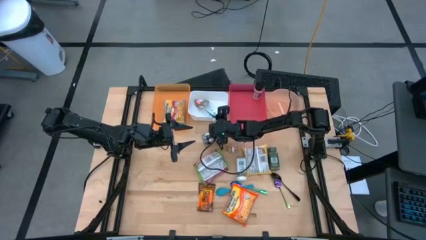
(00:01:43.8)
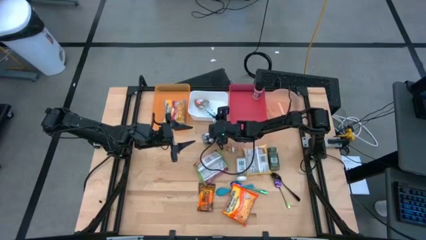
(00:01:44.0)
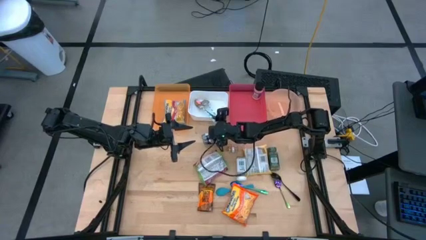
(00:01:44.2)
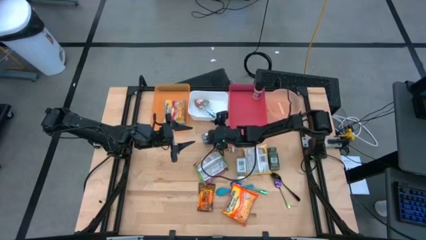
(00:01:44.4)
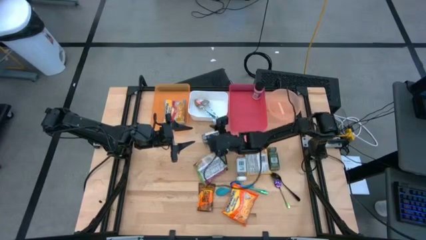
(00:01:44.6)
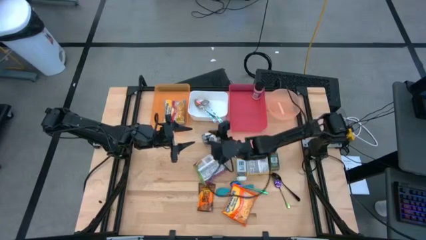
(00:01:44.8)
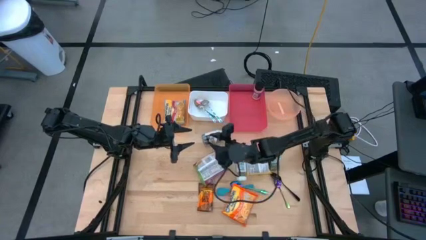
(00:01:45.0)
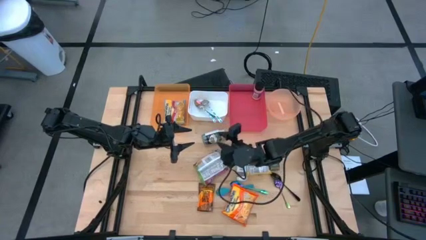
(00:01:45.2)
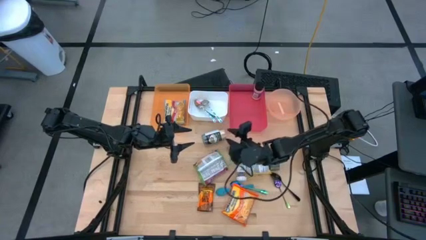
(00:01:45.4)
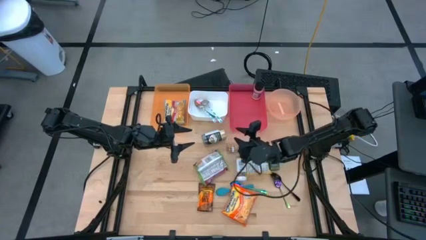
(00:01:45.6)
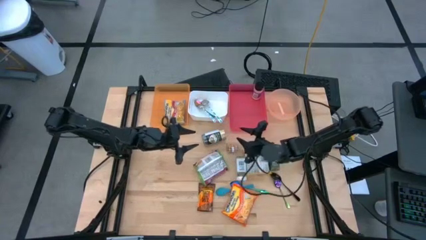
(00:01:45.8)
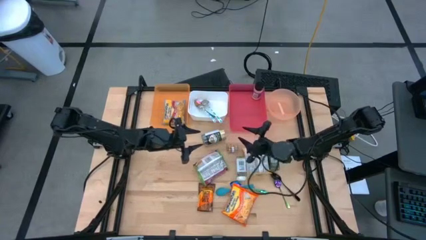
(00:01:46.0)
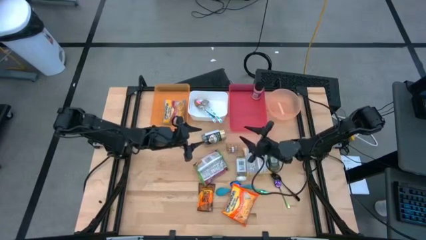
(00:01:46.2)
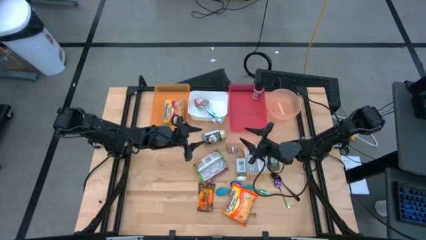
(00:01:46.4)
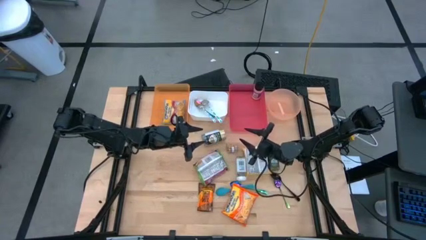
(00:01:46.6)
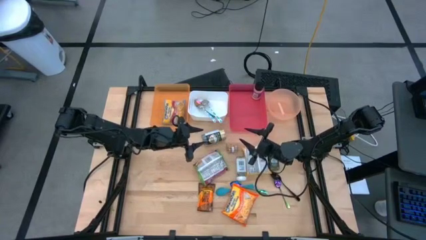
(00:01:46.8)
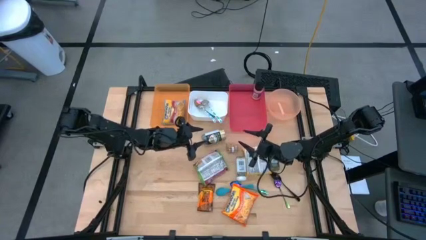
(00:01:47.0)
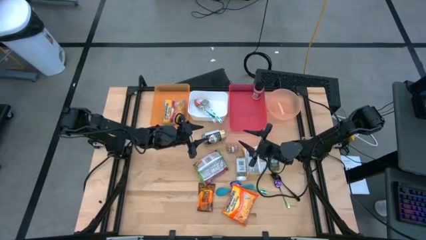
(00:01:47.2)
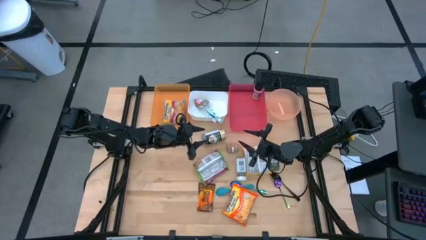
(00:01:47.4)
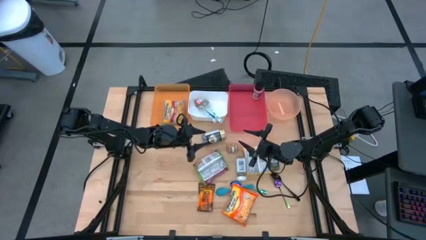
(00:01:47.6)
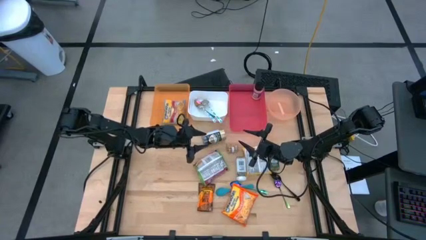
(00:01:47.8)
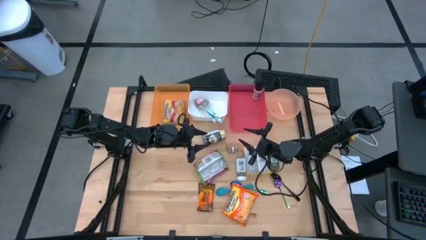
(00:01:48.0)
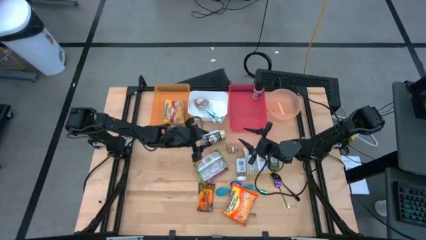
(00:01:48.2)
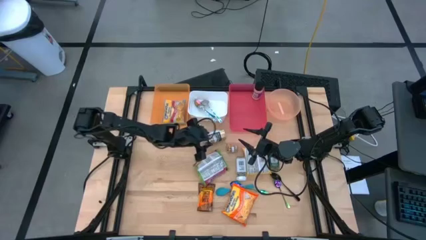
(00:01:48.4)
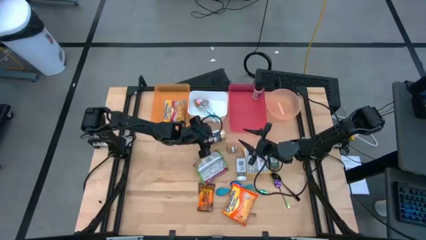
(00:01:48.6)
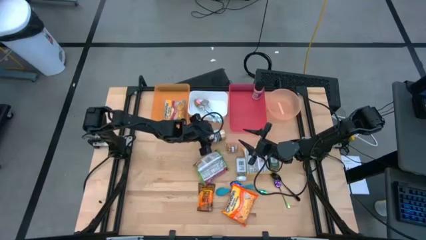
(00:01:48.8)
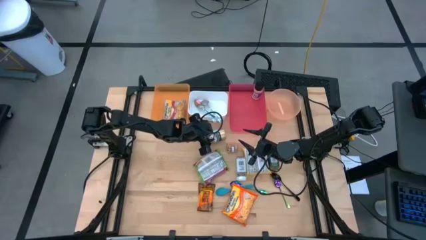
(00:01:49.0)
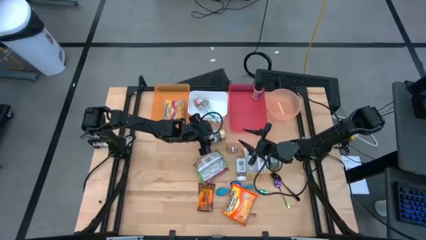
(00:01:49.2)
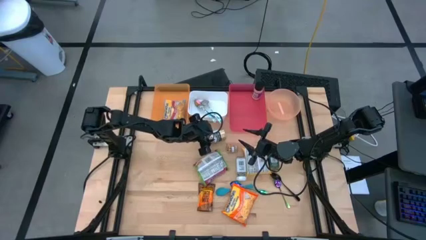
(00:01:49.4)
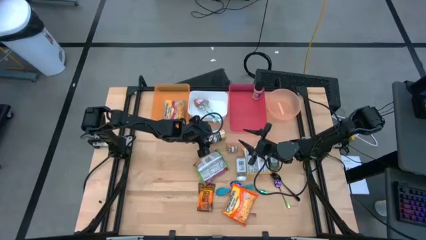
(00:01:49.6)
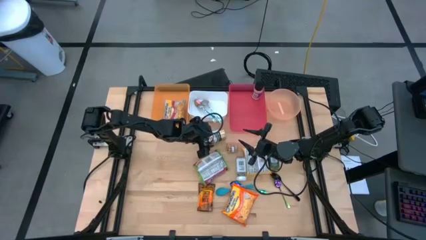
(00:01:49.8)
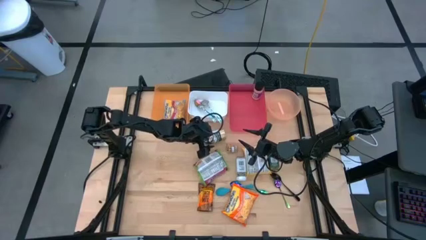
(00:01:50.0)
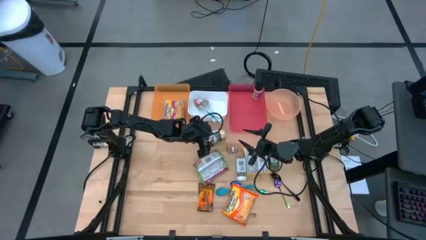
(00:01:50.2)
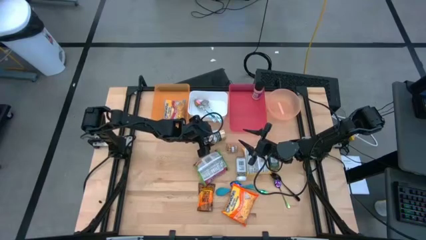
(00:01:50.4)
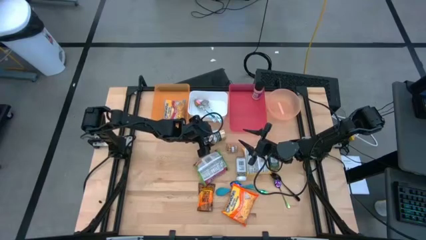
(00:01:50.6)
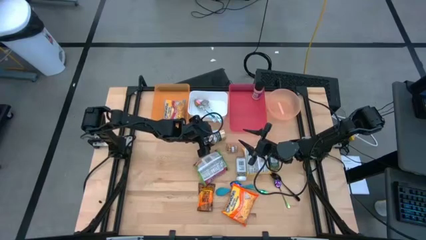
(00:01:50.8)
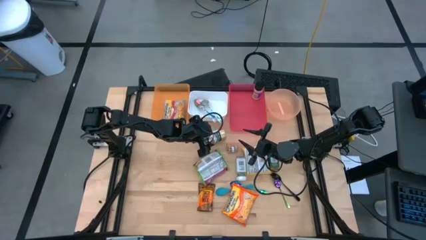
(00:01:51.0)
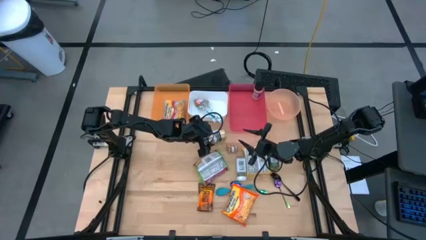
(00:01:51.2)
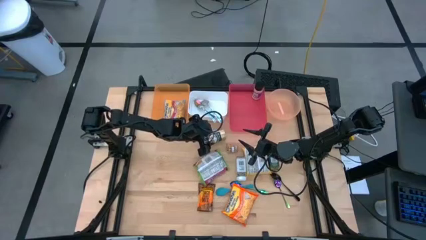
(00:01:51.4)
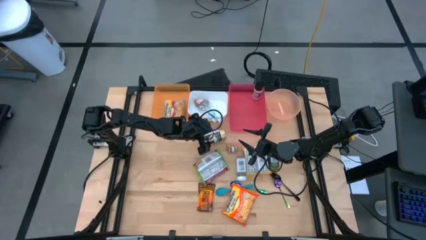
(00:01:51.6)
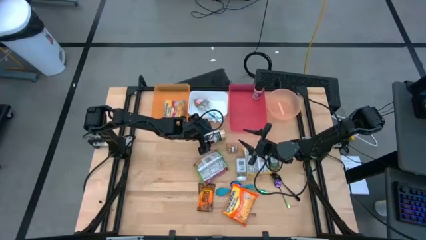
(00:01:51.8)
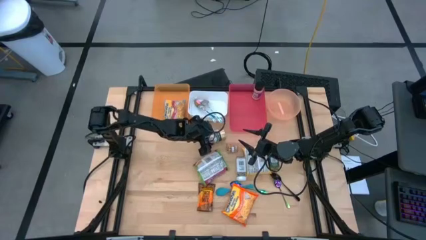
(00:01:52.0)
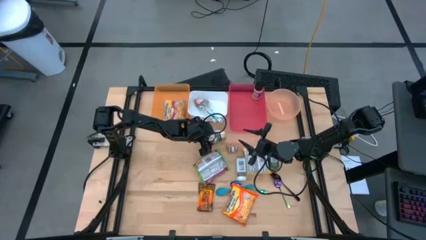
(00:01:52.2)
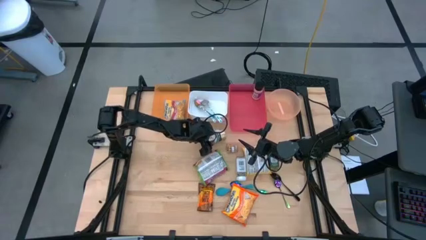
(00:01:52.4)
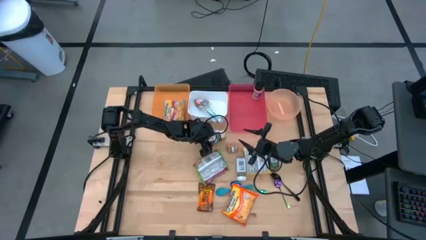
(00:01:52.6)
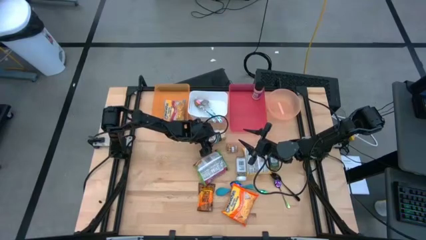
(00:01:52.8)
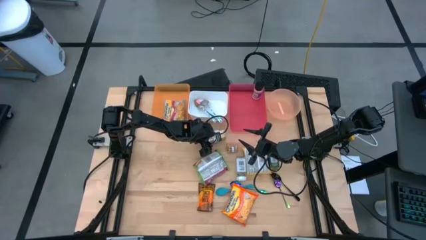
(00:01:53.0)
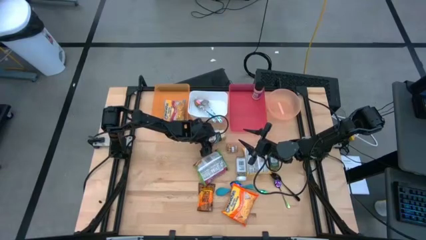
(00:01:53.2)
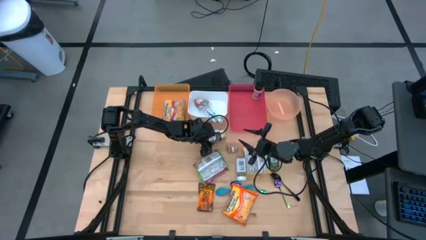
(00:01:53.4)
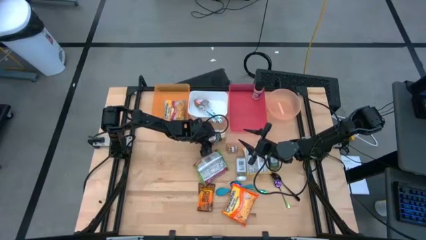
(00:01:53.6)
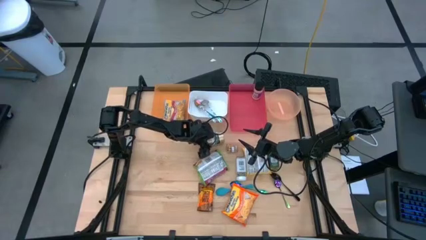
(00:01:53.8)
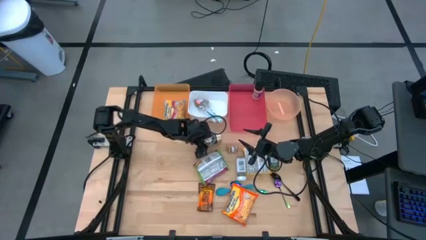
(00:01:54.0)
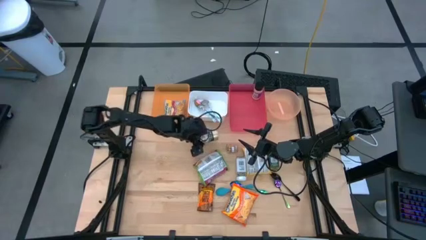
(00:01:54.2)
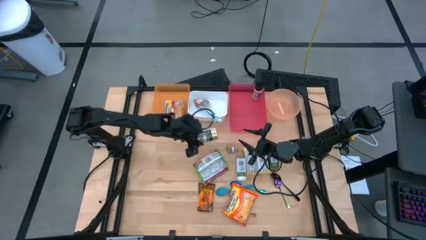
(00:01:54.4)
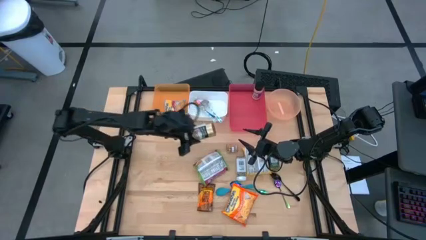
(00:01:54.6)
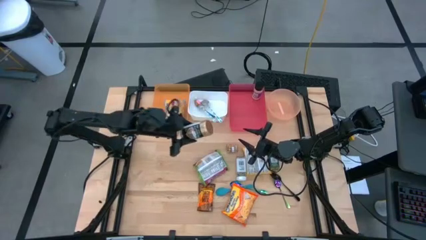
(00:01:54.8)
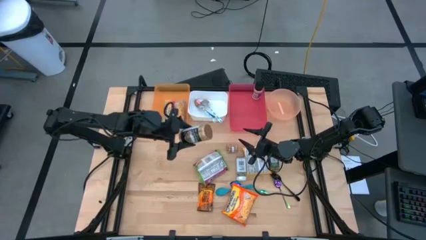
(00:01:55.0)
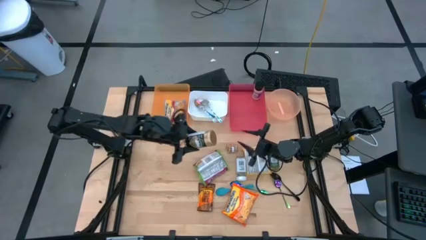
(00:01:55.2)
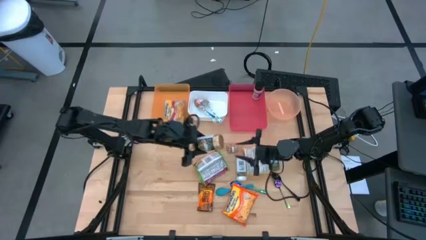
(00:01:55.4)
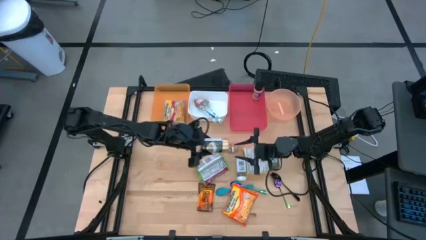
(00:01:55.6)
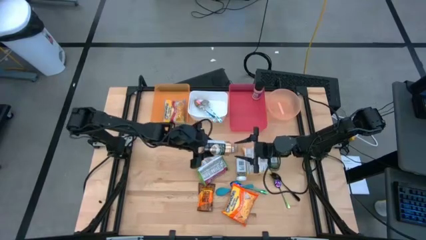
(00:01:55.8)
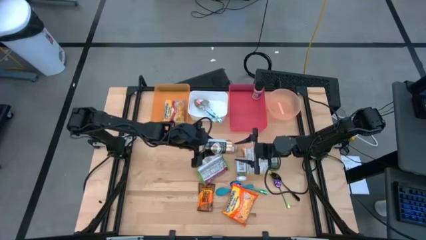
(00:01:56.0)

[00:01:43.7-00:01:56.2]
Task: Pick & Place Food Item
Put the gold seasoning bottle into the red bin
